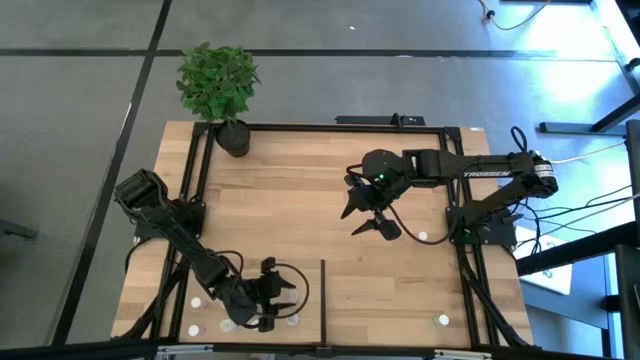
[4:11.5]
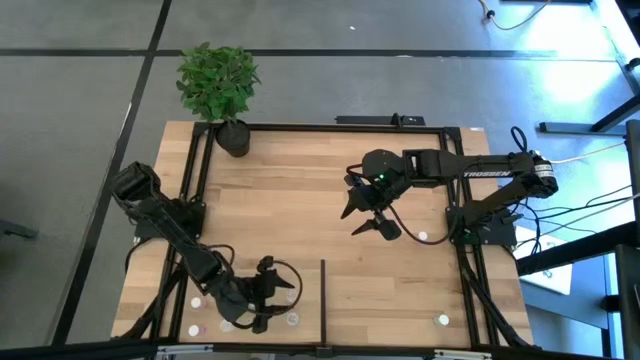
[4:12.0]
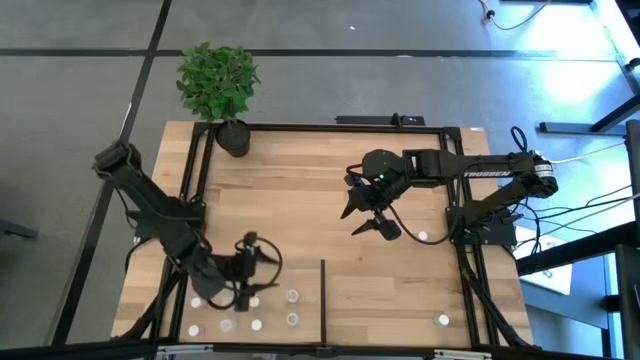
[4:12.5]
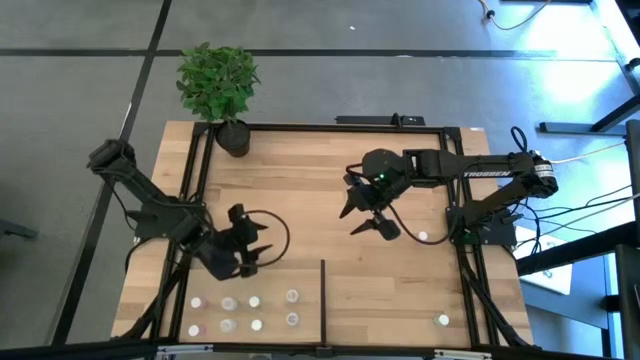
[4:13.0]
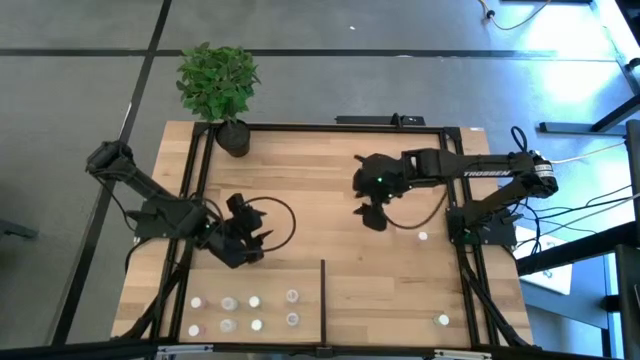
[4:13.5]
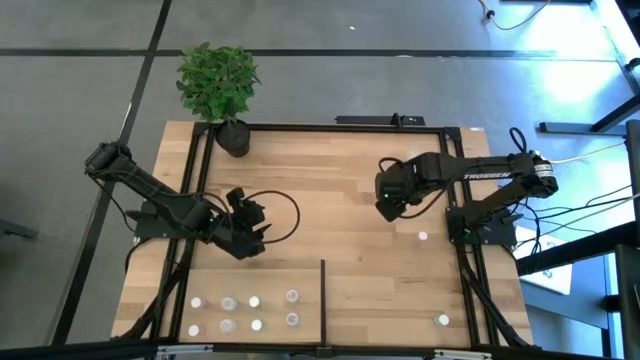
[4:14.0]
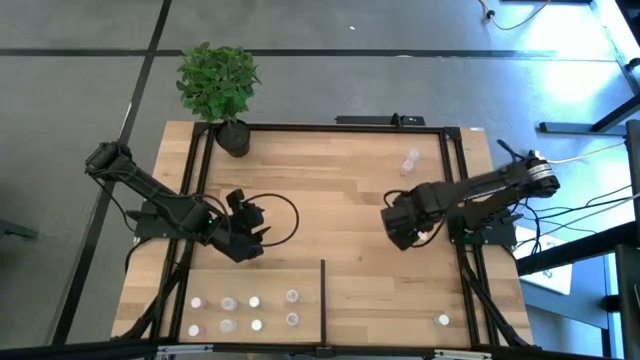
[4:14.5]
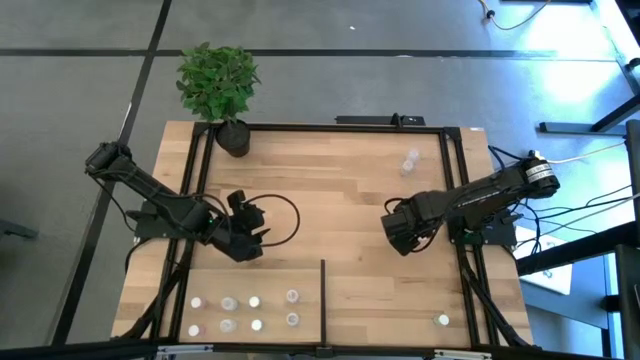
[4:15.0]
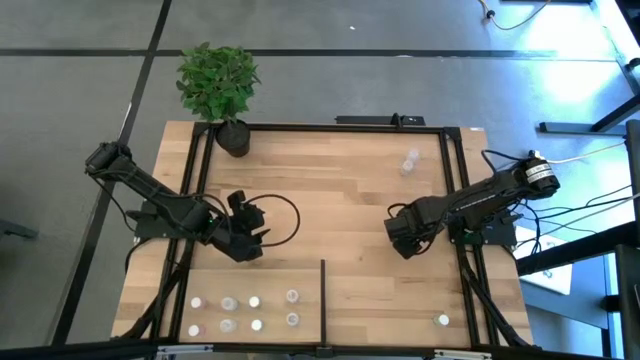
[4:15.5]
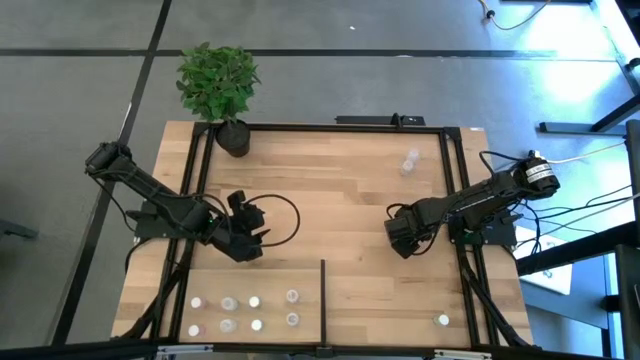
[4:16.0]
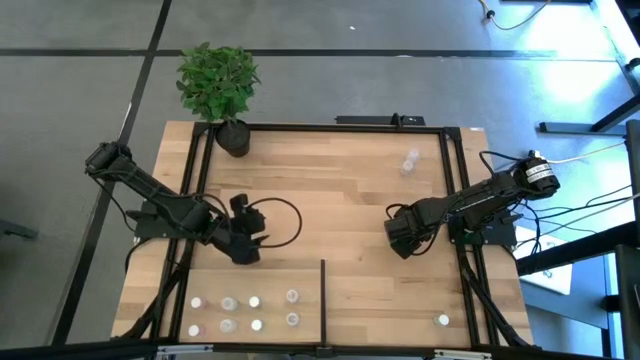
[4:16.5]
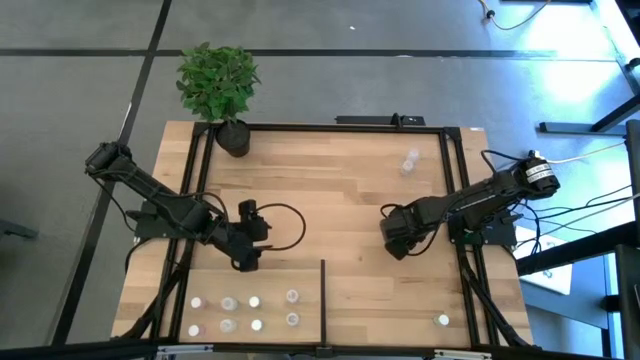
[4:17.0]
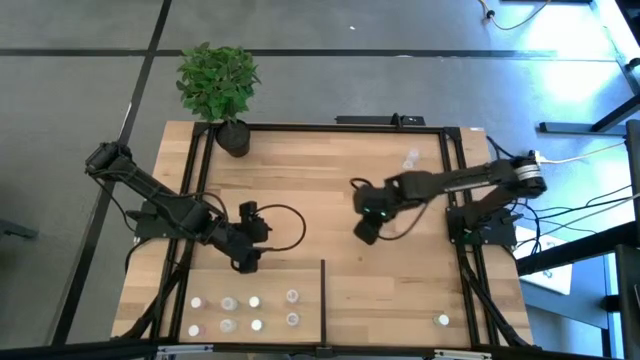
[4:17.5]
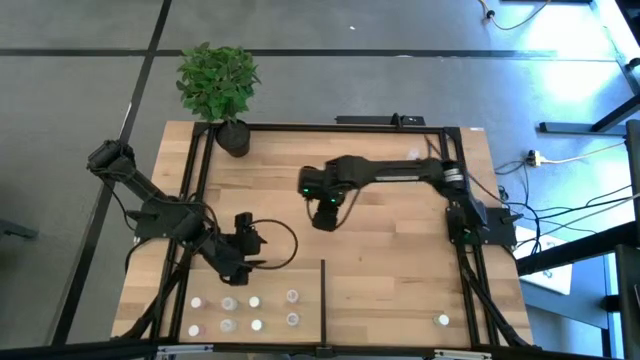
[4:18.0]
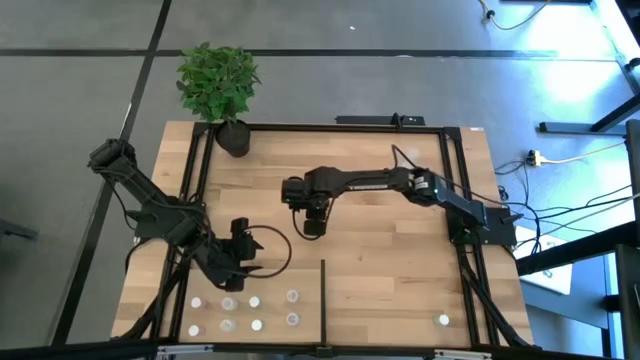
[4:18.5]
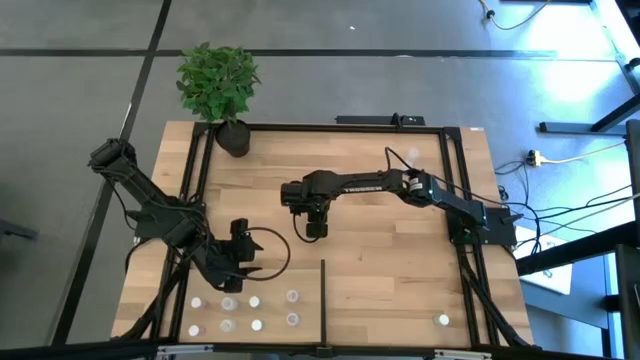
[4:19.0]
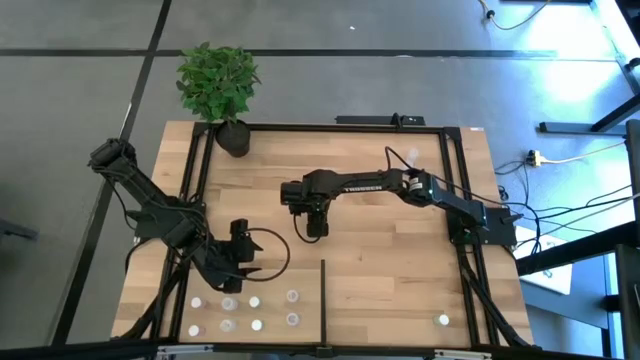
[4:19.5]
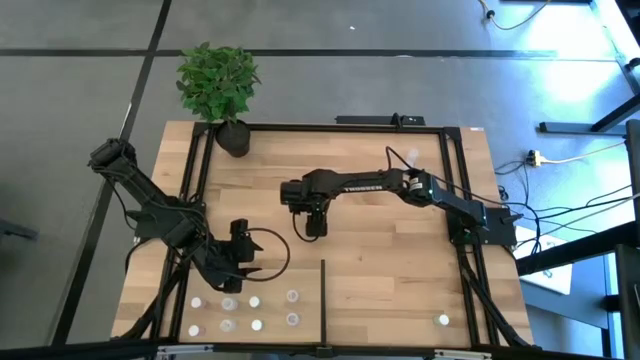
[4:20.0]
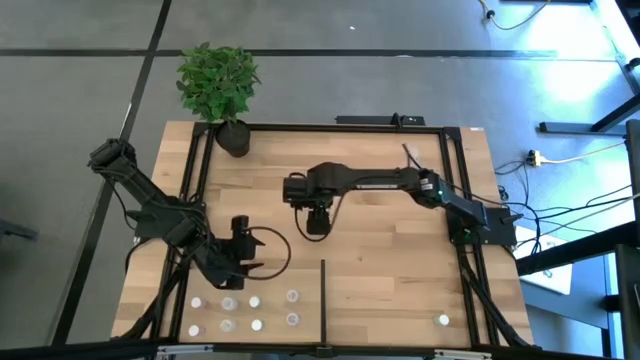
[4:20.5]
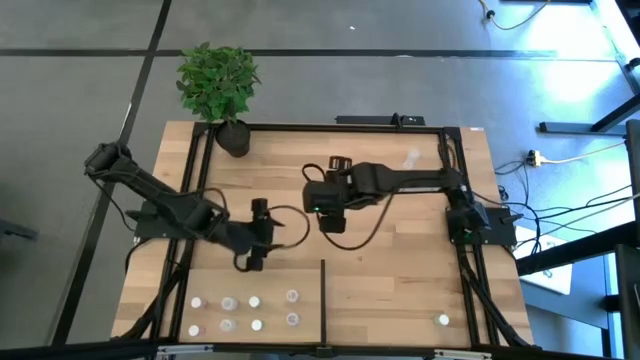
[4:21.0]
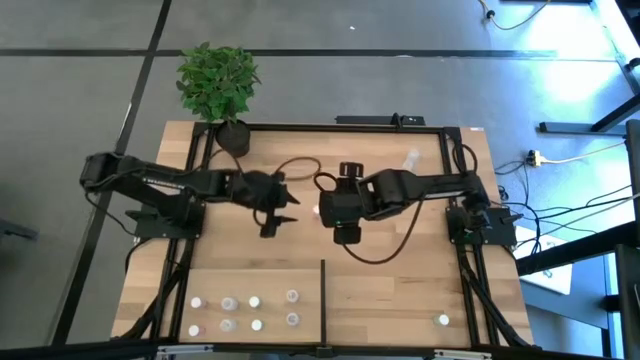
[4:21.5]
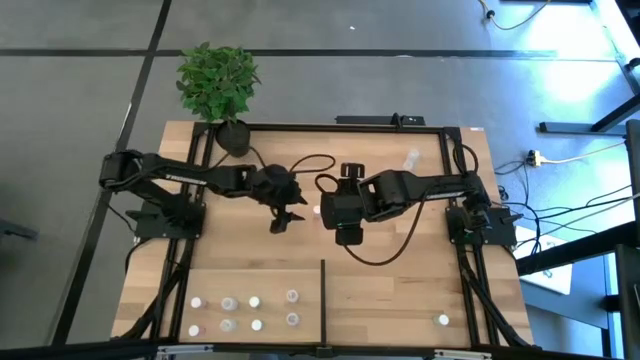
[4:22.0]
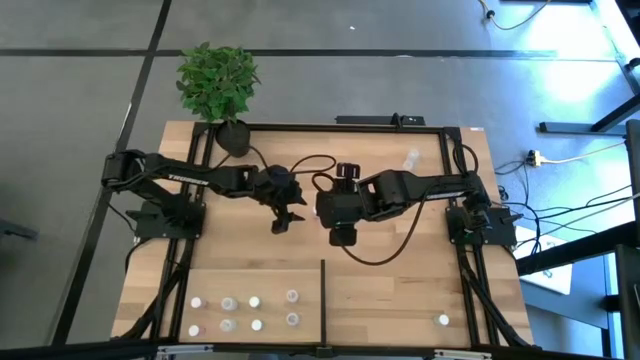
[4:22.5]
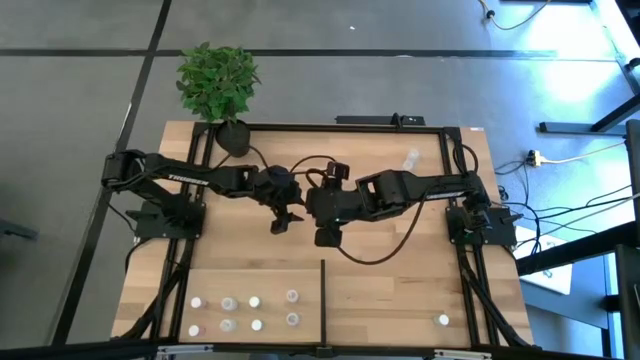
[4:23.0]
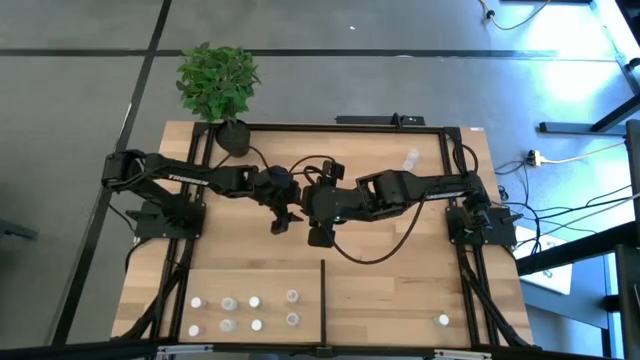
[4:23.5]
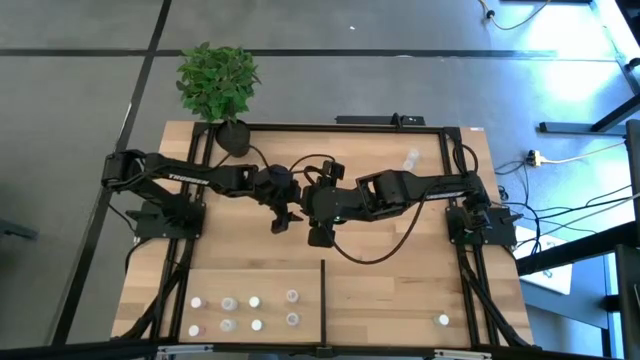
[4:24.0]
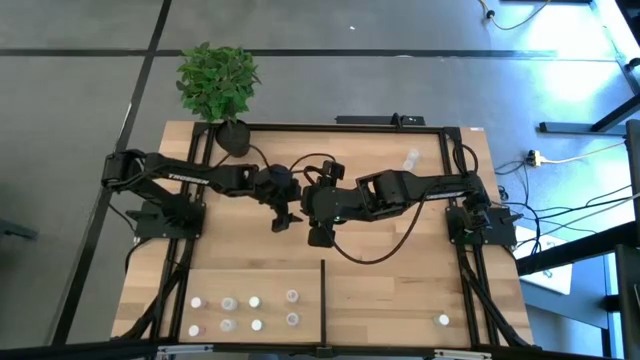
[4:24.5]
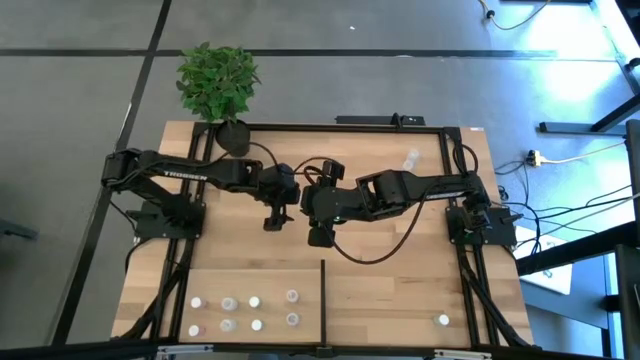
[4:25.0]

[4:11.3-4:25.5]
Task: Pick and place medicine bottles onto shelf by color
Put the pink pill bottle on the shelf aligned with the other pink pill bottles

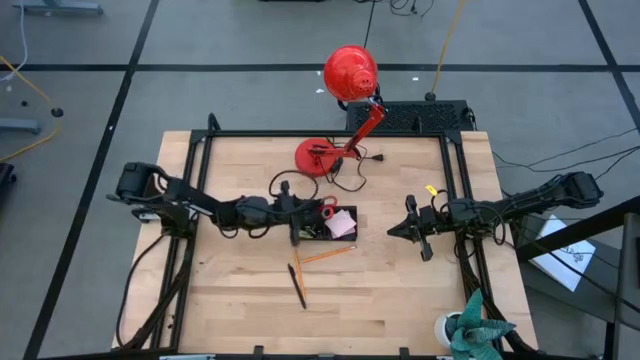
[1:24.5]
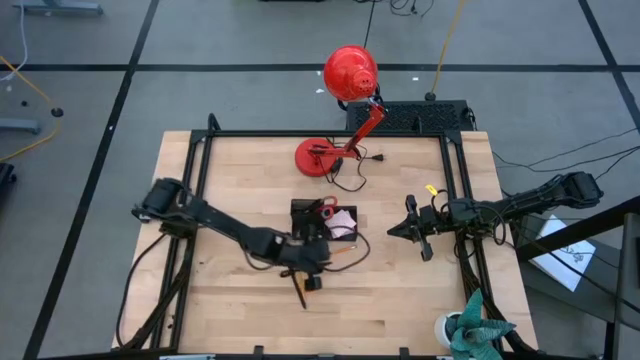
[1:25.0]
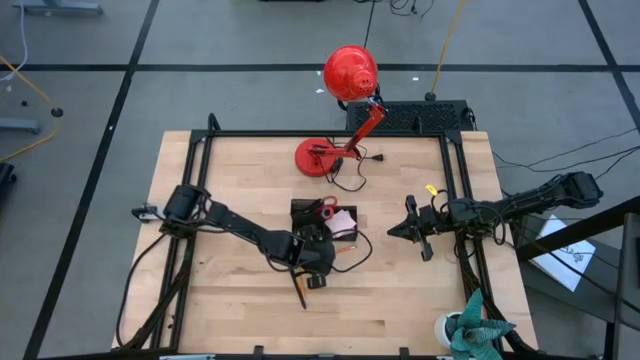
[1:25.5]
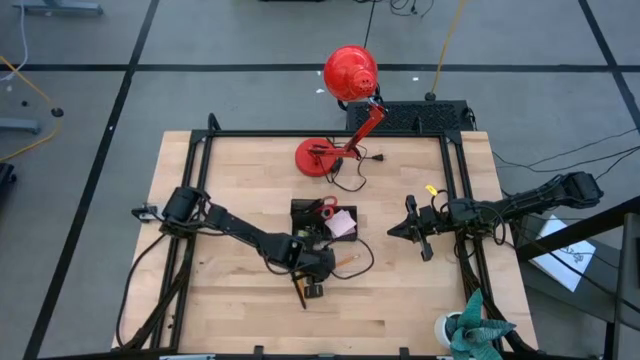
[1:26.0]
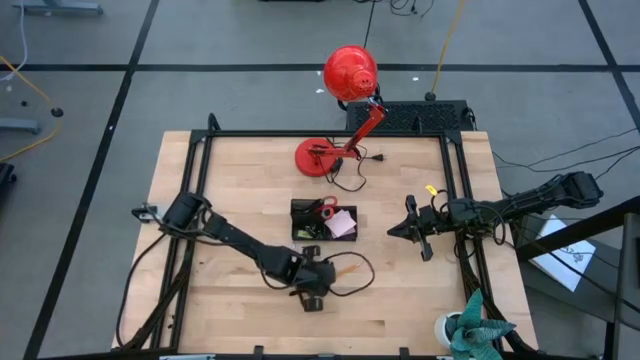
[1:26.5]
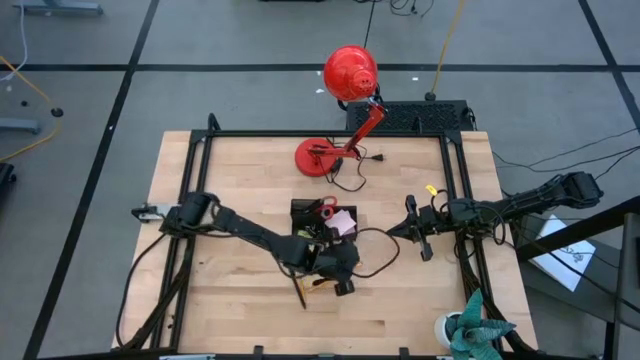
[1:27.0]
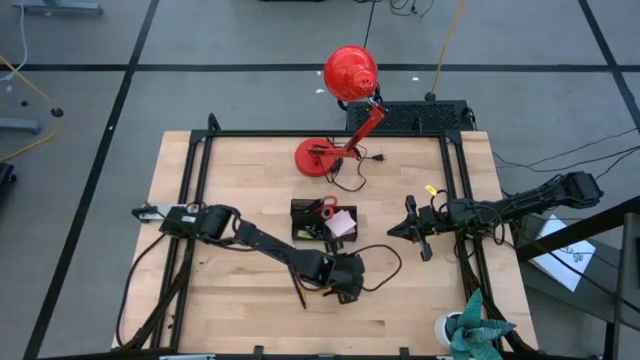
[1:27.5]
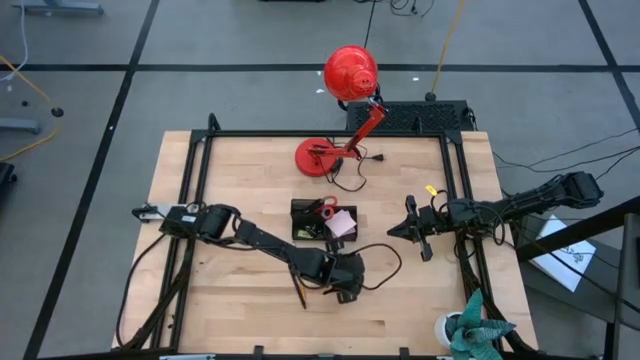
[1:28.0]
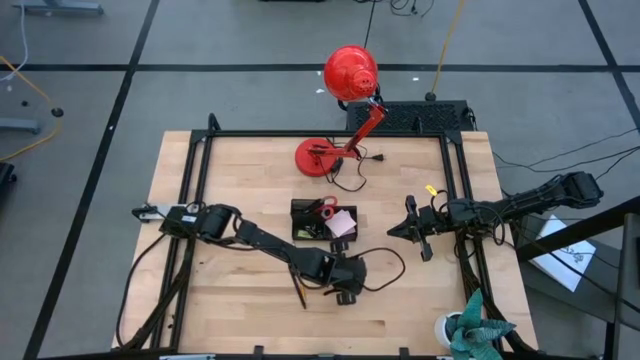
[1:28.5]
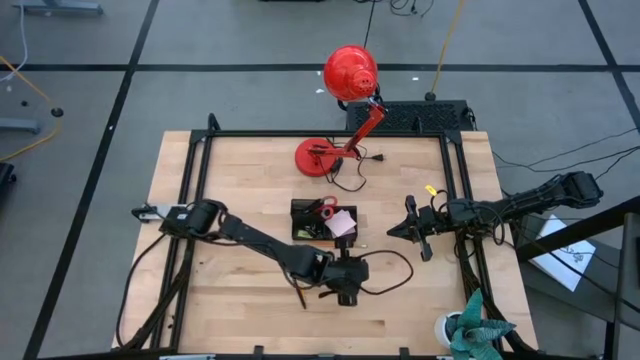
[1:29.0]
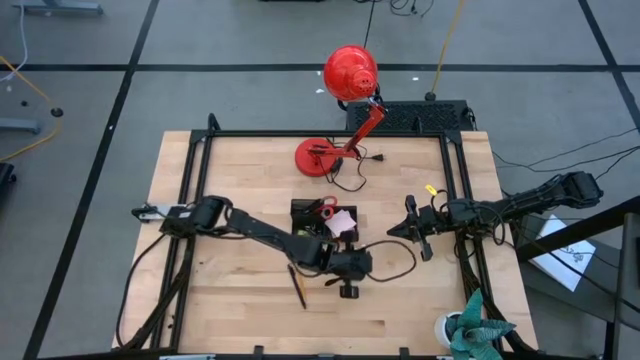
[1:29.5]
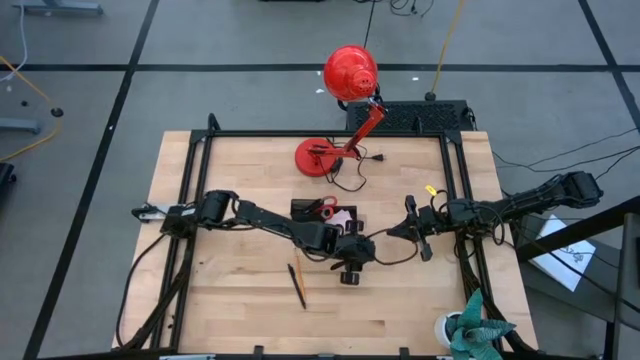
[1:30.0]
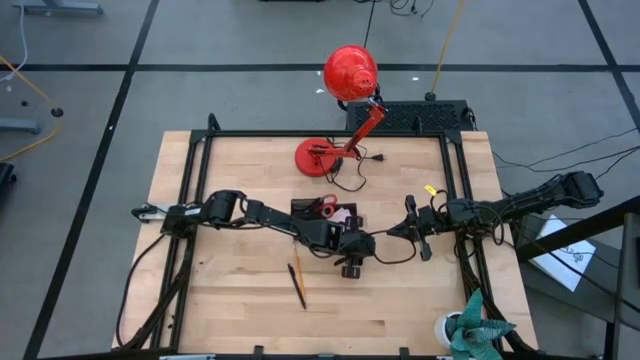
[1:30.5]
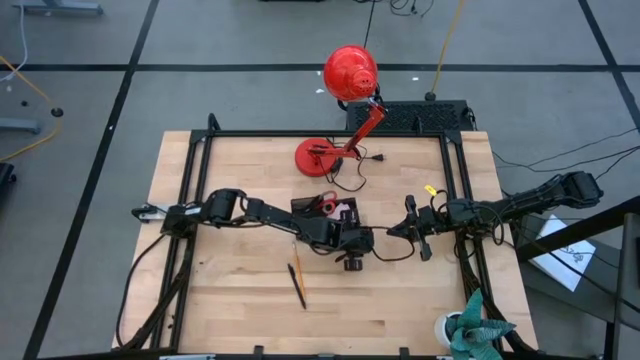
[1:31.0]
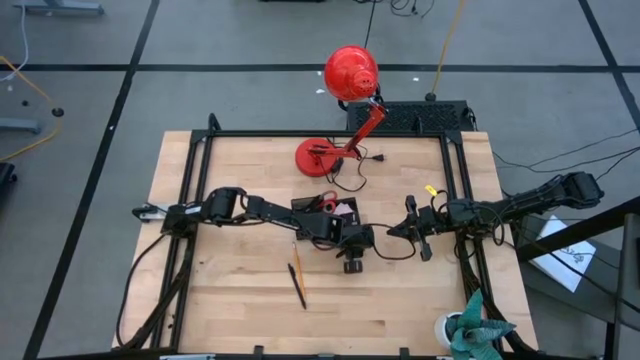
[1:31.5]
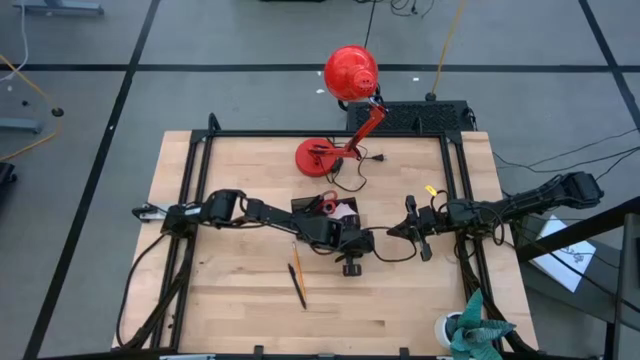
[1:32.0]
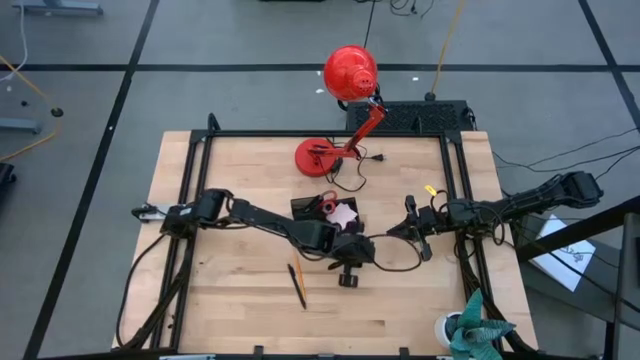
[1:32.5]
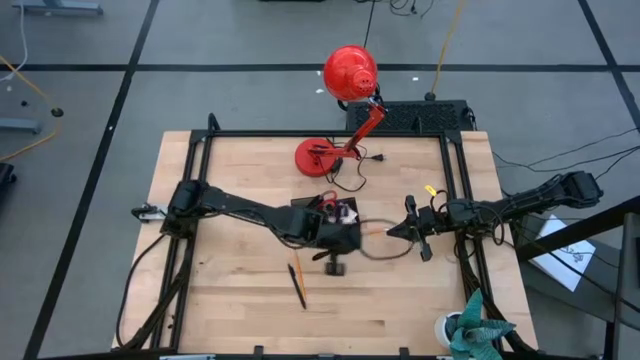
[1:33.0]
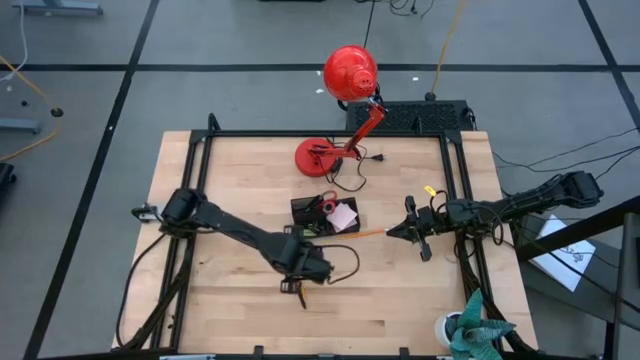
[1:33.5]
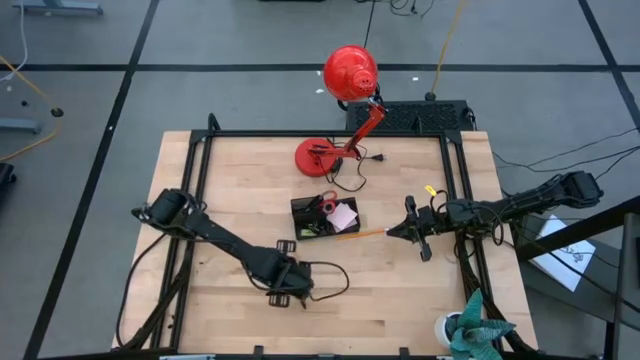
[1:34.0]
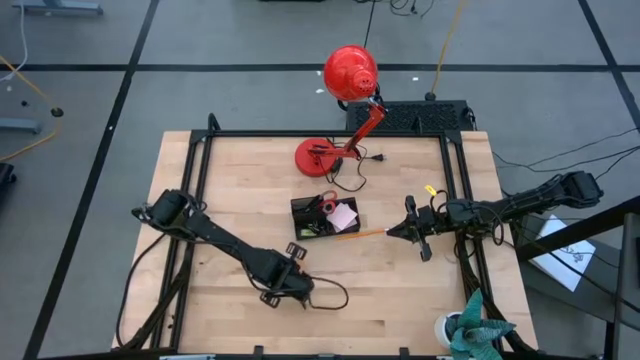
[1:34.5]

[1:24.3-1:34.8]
Task: Pick and place office supplies into organizer
Put the right yellow pencil into the desk organizer
